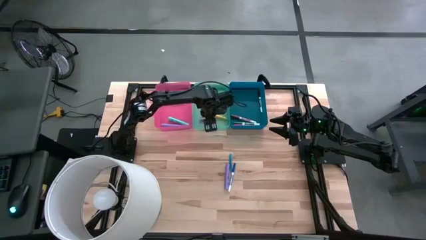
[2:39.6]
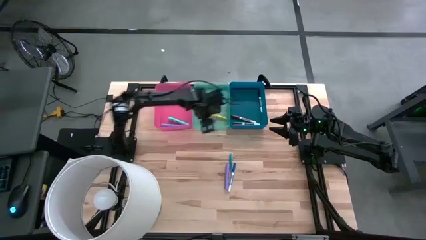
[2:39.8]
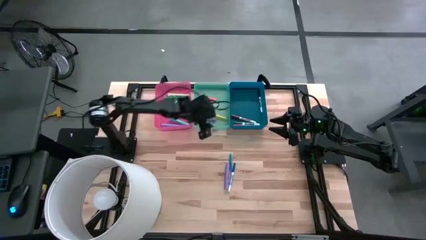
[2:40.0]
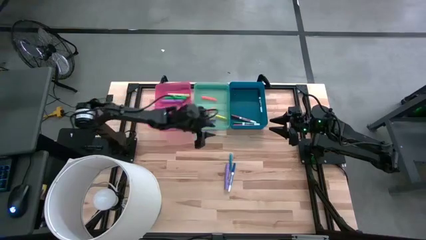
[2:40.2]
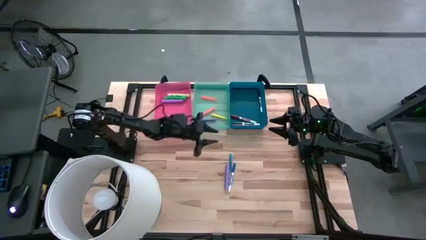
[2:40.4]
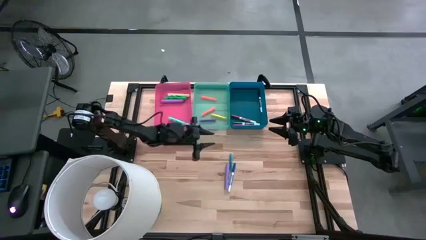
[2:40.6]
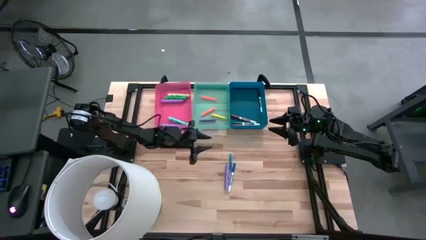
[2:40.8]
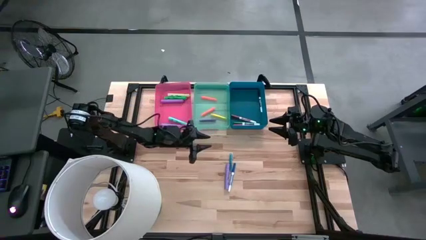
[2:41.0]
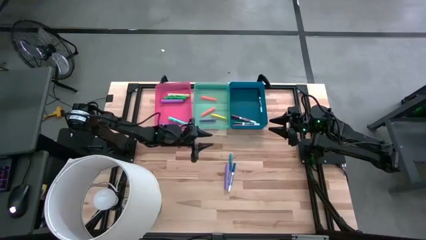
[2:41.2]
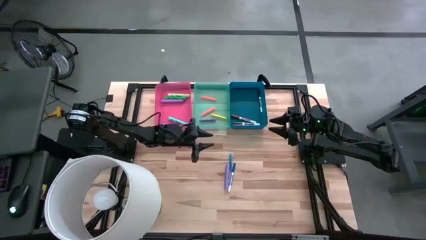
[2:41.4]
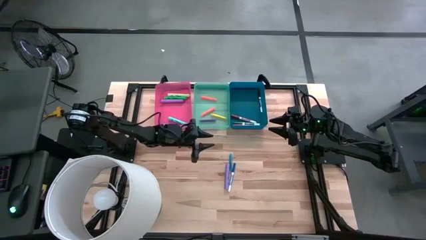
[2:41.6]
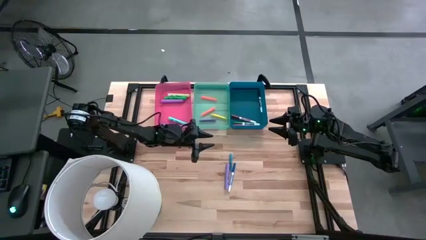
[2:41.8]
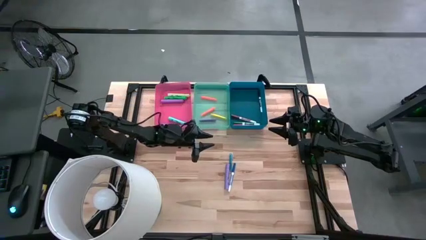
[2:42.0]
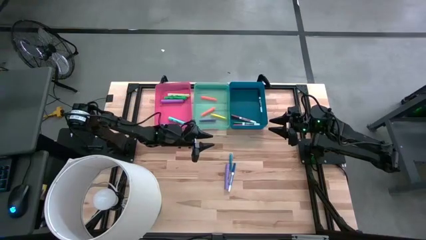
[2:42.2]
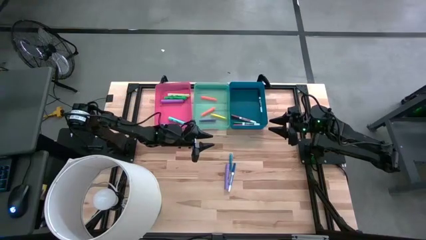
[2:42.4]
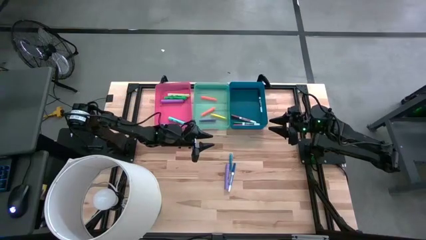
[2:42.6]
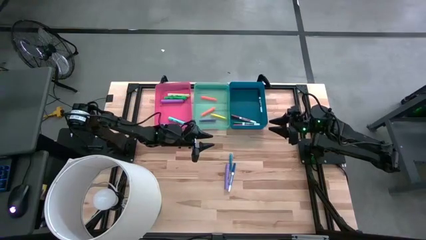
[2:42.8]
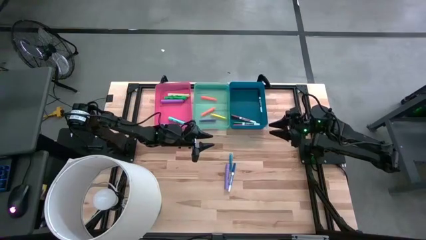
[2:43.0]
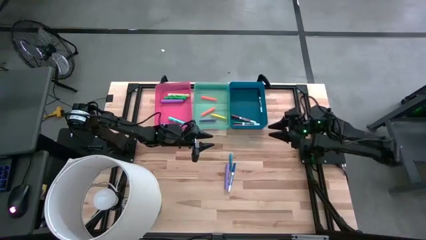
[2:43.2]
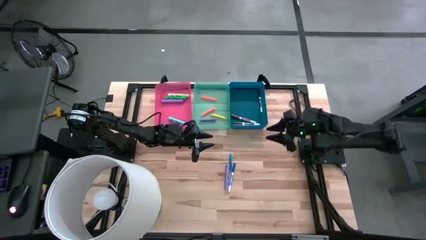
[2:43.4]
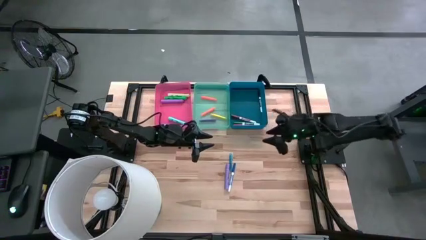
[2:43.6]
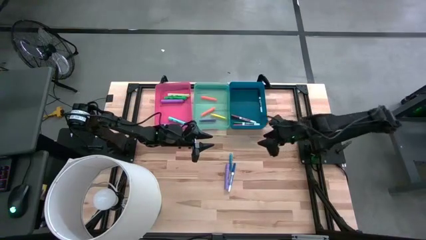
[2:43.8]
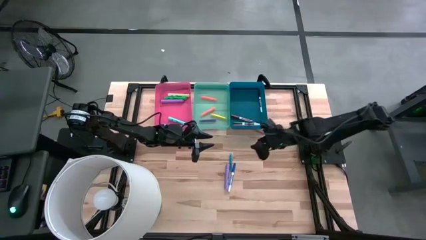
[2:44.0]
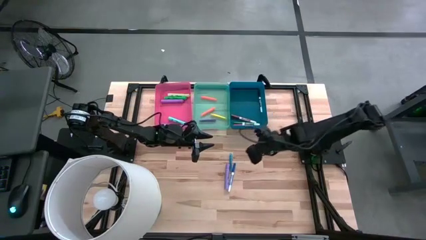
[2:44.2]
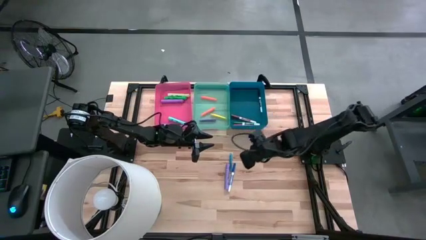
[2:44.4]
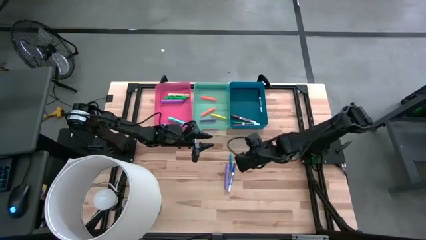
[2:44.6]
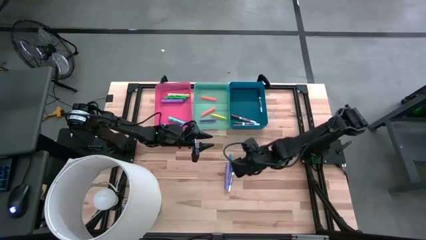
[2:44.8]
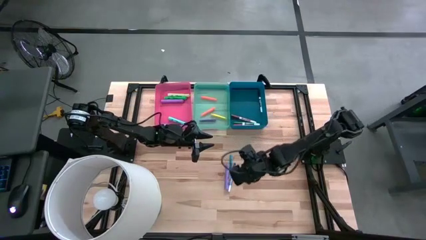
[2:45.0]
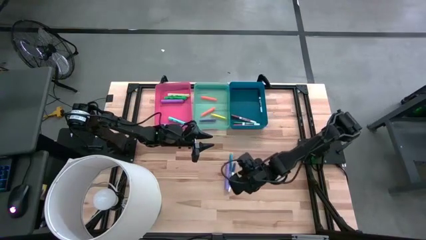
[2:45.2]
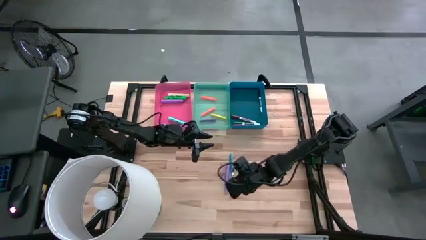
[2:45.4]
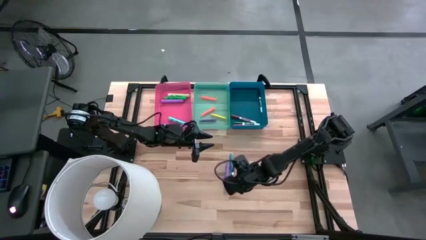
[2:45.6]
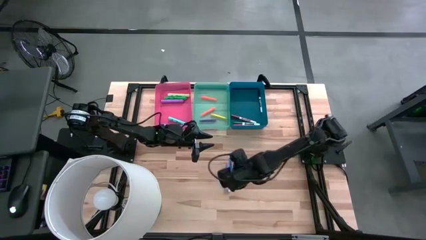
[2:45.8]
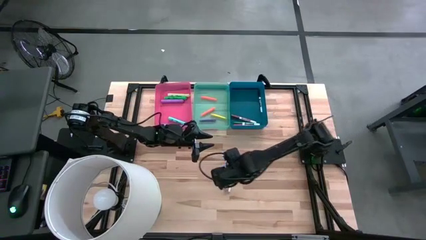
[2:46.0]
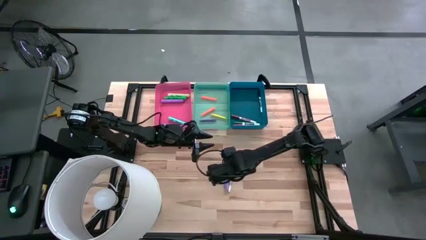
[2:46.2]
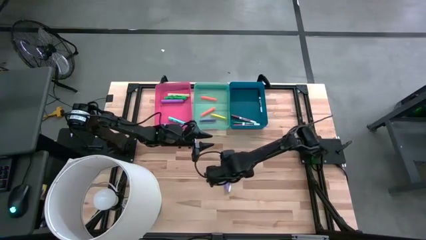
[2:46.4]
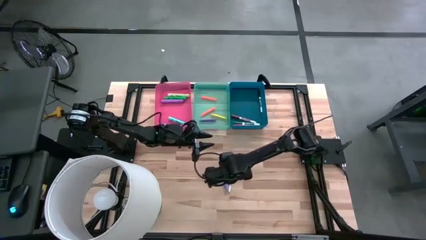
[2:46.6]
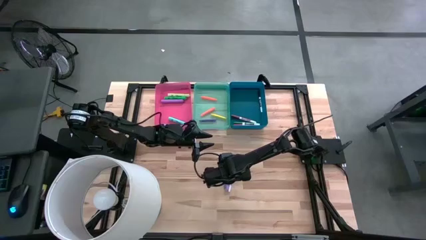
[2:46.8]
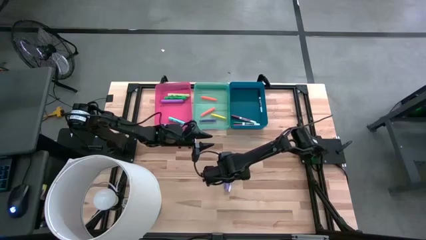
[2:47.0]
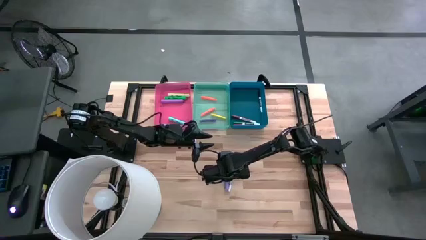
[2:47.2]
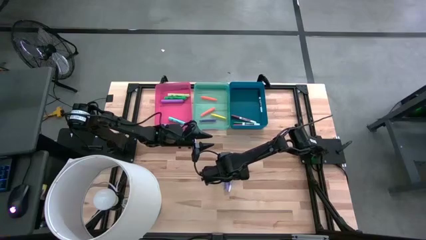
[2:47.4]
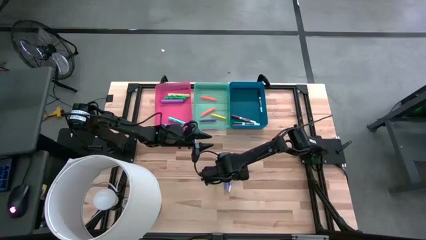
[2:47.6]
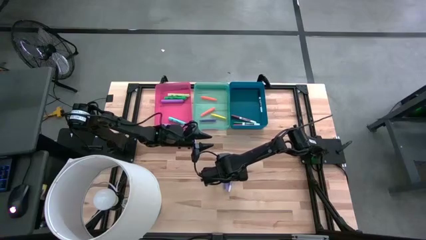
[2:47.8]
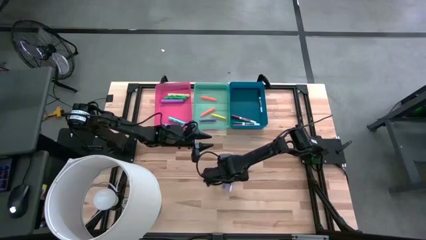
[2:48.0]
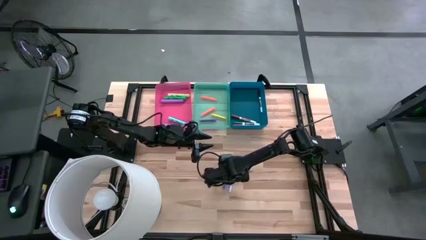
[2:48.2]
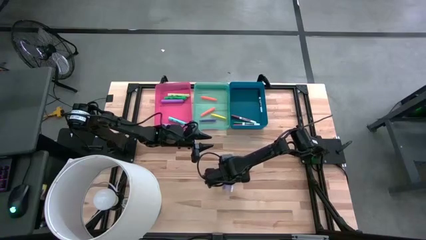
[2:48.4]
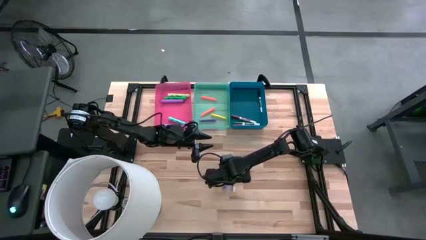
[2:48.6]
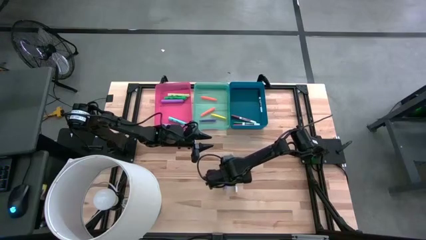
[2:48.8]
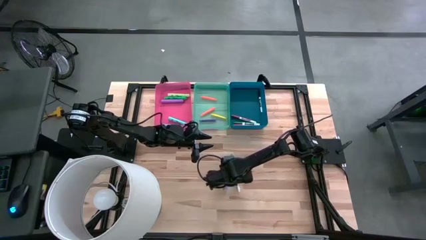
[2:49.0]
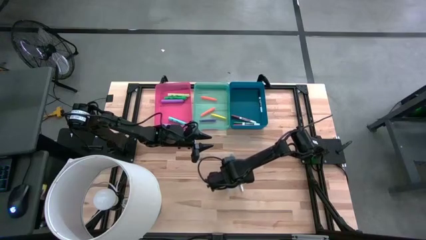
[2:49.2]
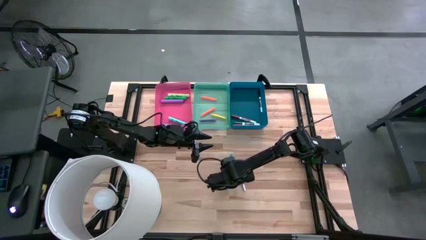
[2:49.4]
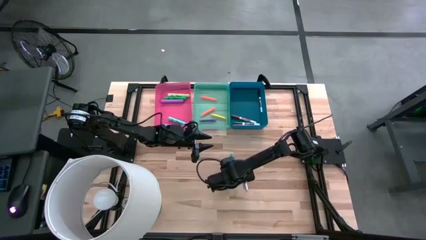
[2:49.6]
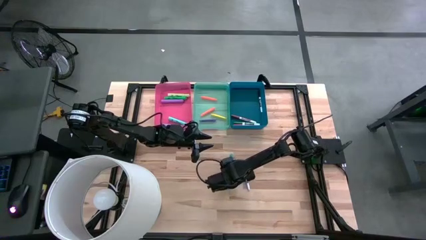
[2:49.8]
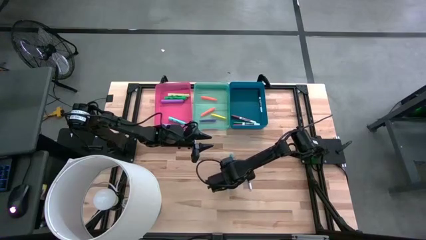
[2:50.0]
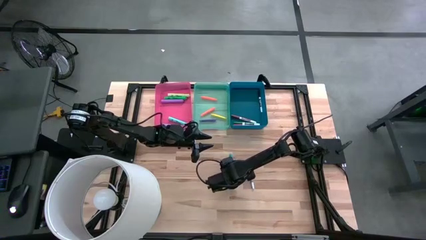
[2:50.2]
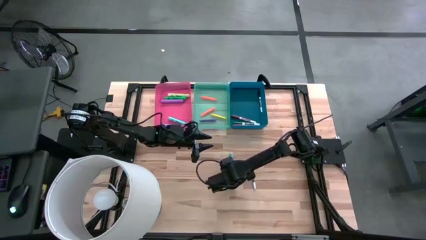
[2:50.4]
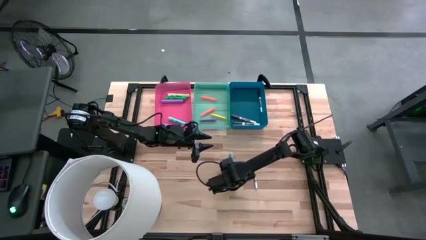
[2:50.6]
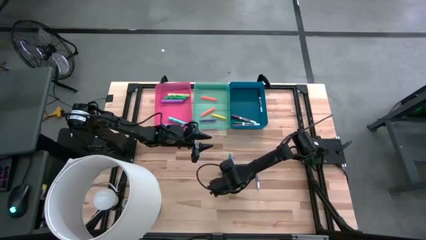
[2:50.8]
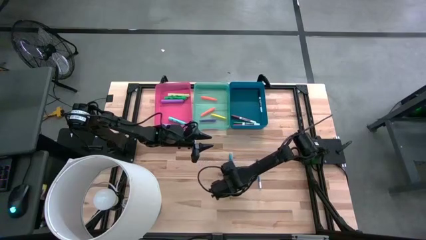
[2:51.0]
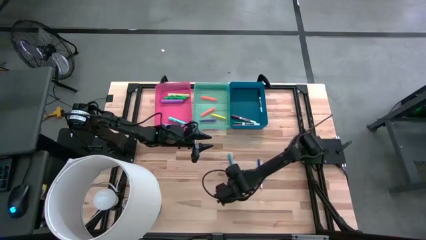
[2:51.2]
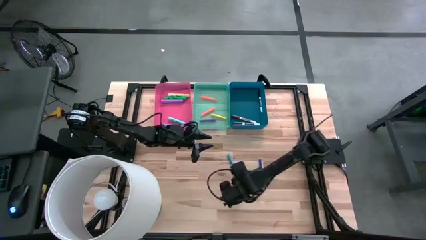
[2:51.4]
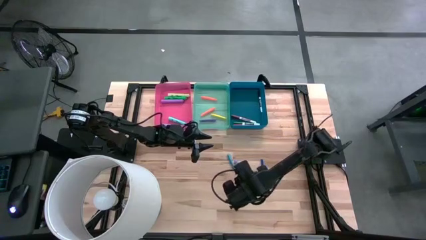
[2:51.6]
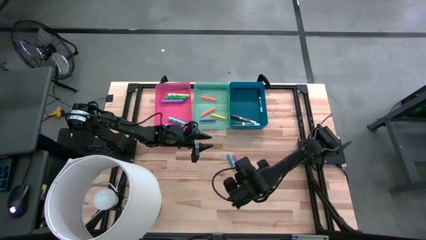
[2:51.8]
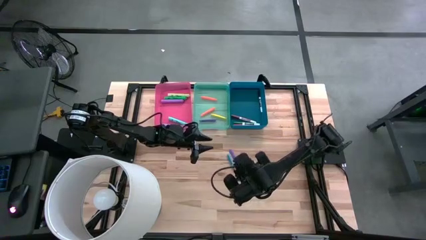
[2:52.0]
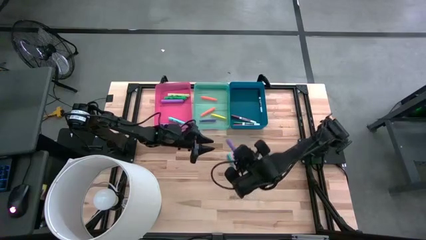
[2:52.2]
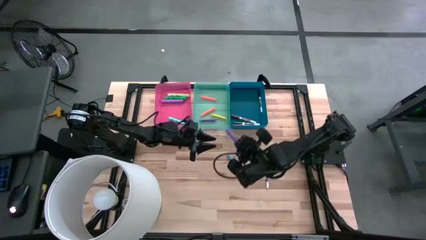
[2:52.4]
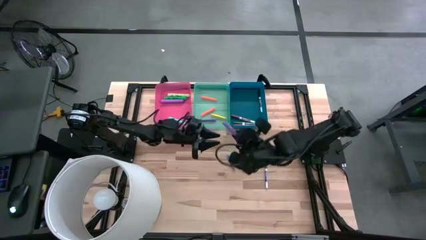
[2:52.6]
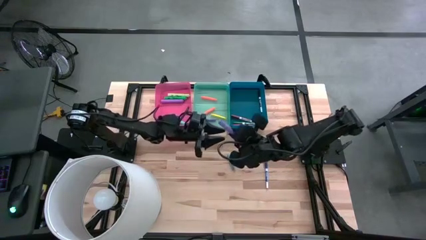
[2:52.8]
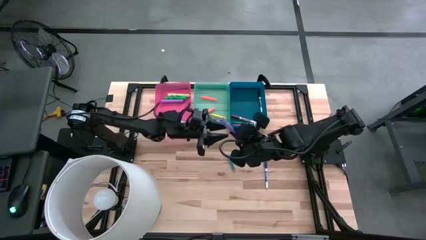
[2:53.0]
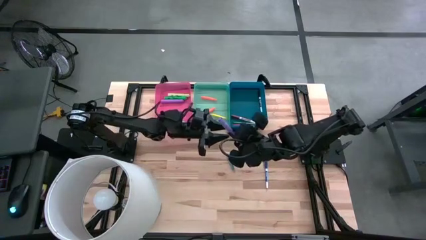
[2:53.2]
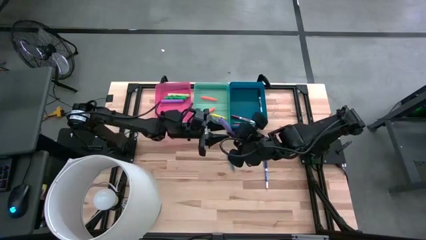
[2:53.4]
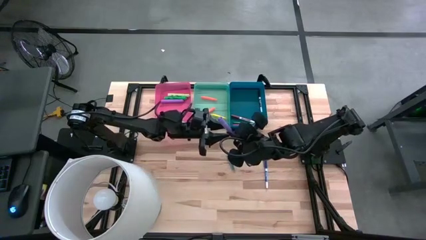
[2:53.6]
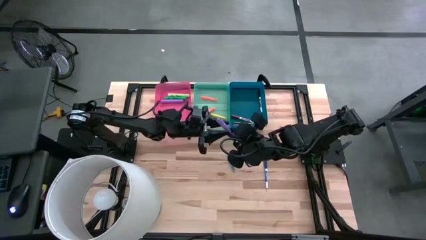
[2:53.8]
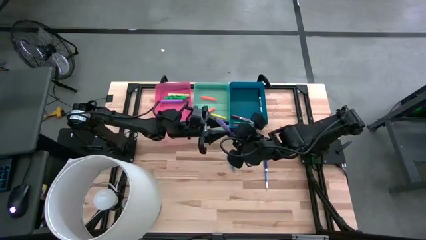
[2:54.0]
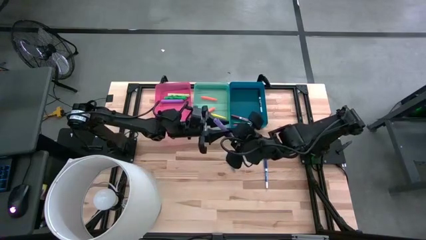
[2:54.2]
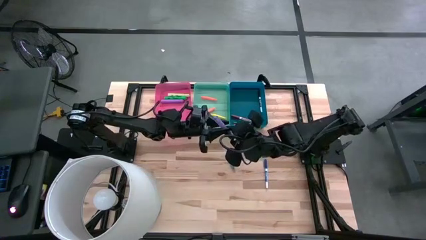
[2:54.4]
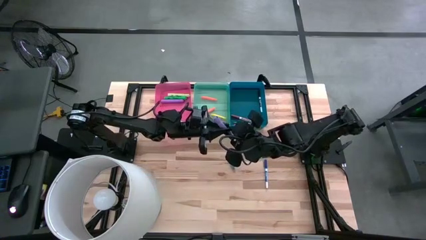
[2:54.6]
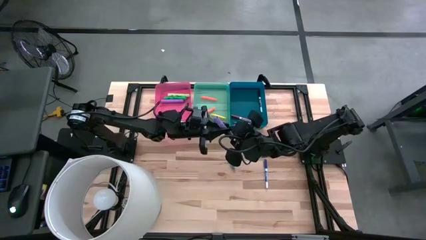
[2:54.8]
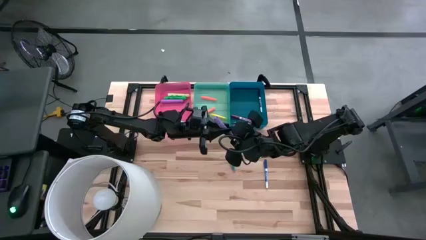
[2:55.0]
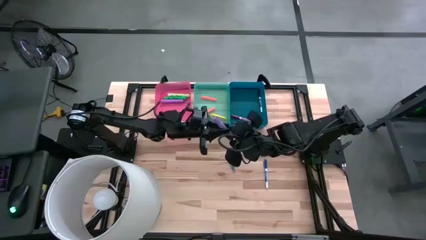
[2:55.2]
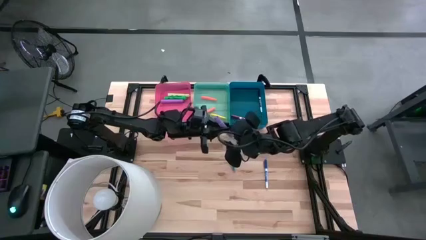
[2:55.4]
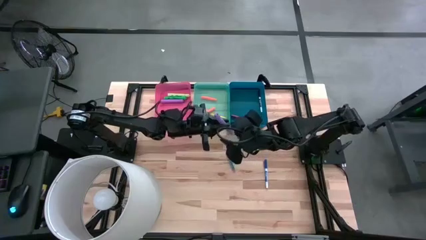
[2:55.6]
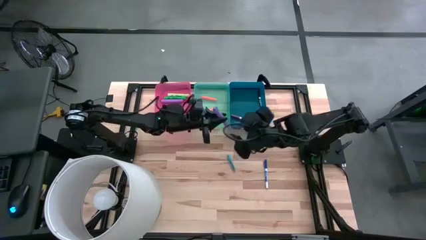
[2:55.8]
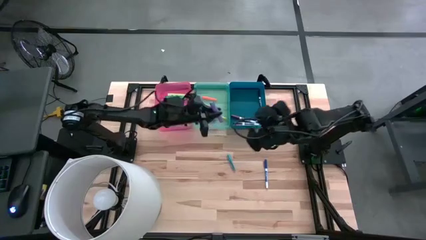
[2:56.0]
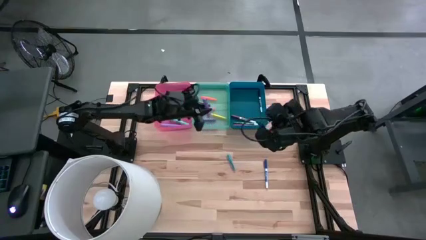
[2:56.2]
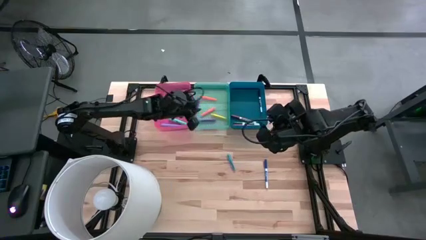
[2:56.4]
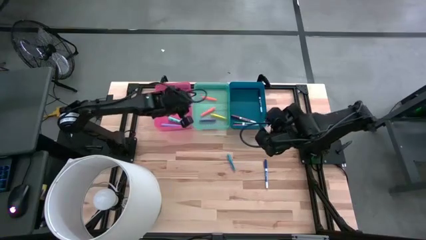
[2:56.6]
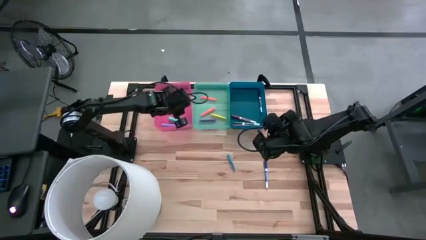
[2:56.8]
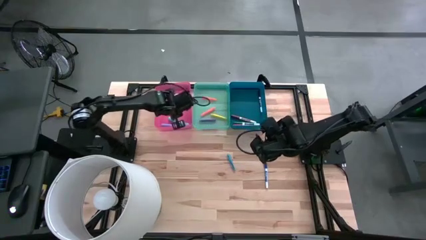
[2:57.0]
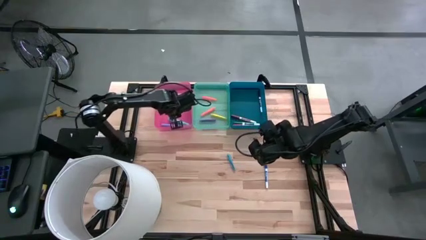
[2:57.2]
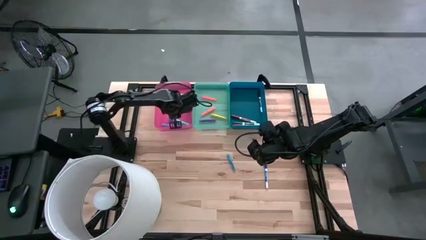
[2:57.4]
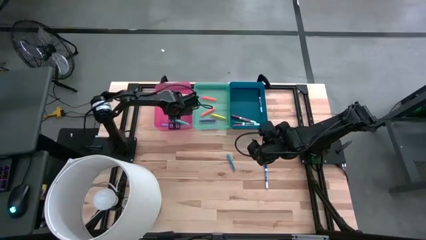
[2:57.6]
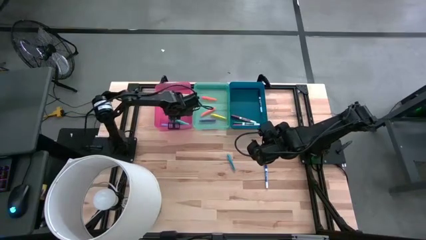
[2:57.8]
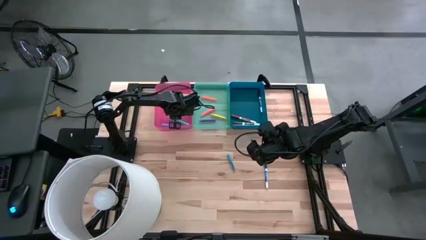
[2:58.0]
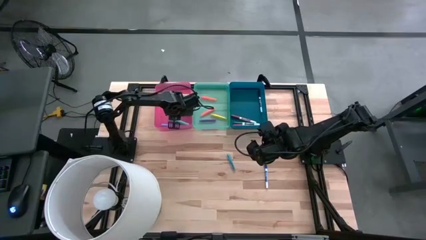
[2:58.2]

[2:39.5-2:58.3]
Task: Pick & Place Markers
Put the purple marker into the red bin
